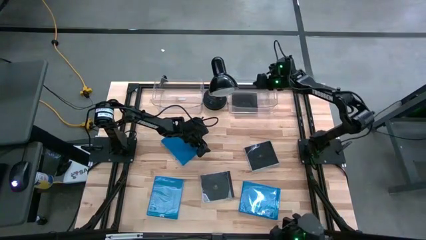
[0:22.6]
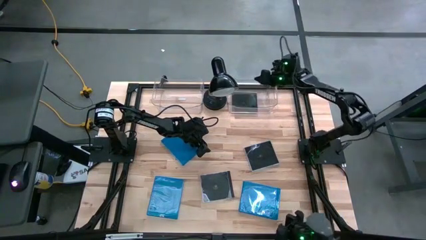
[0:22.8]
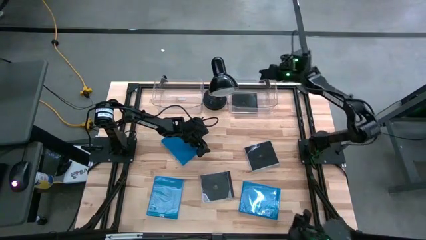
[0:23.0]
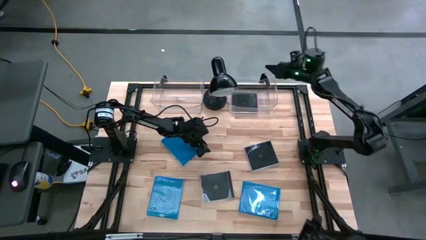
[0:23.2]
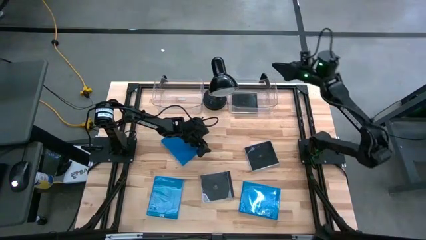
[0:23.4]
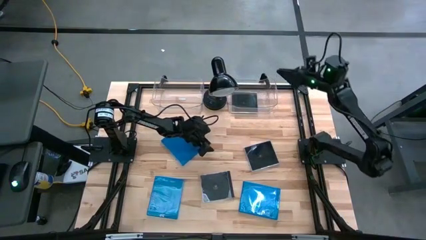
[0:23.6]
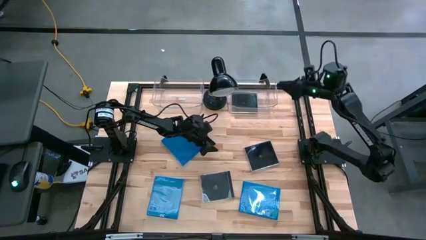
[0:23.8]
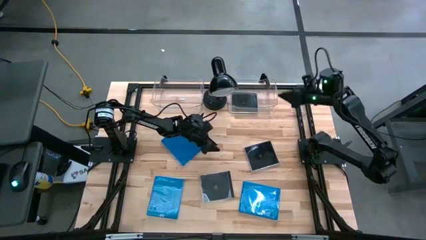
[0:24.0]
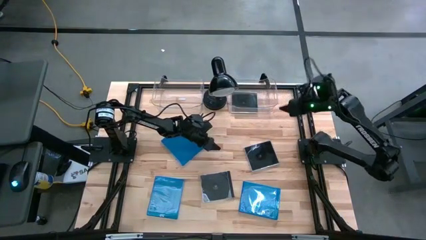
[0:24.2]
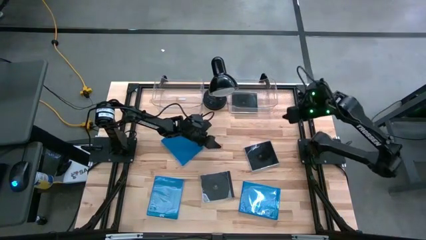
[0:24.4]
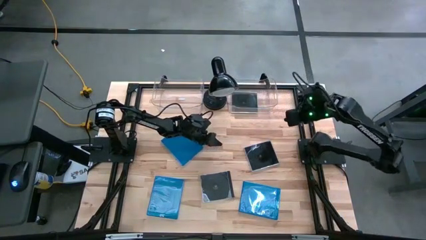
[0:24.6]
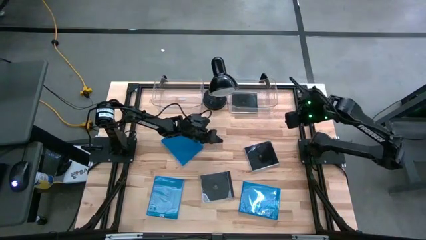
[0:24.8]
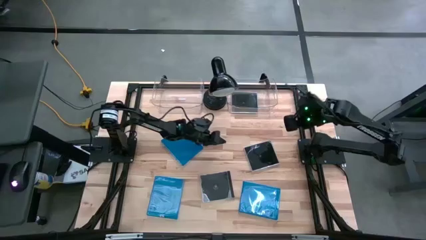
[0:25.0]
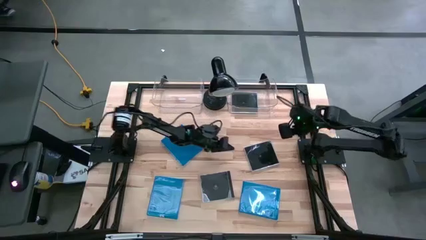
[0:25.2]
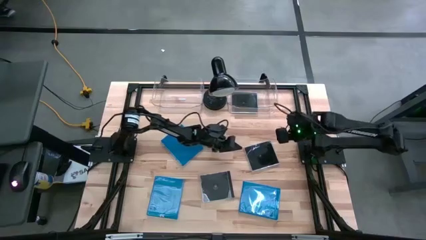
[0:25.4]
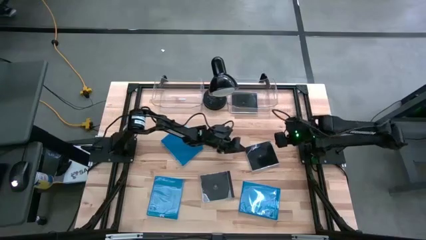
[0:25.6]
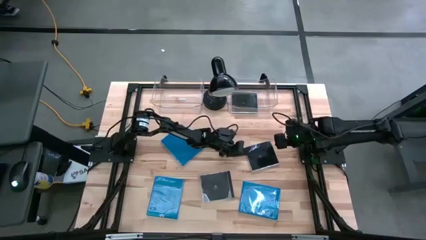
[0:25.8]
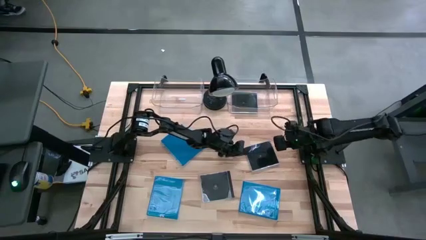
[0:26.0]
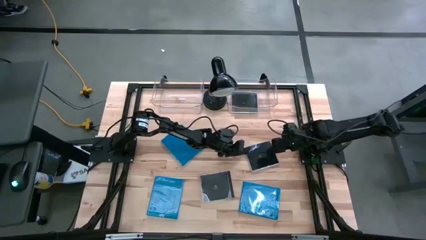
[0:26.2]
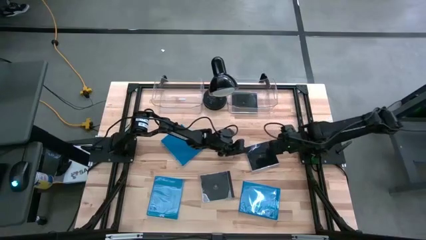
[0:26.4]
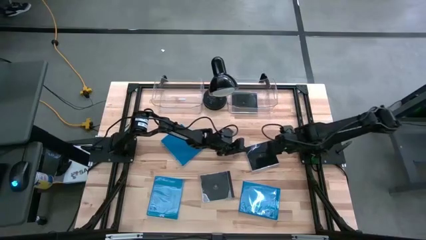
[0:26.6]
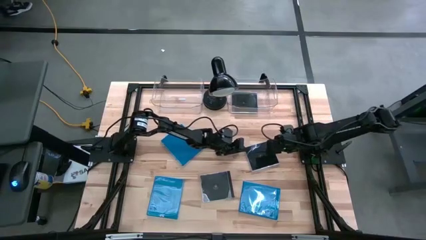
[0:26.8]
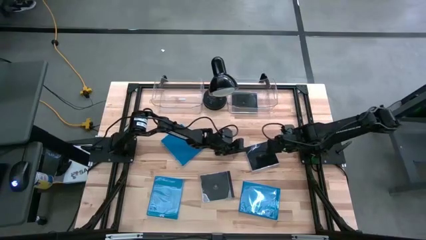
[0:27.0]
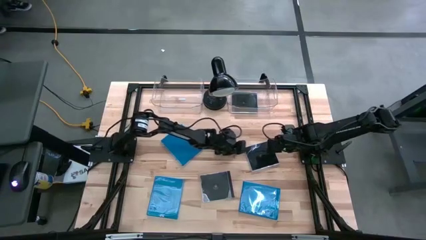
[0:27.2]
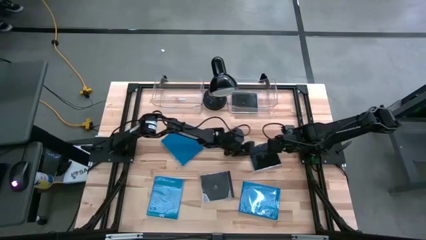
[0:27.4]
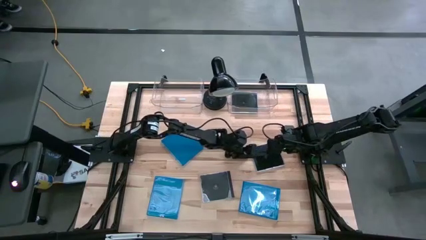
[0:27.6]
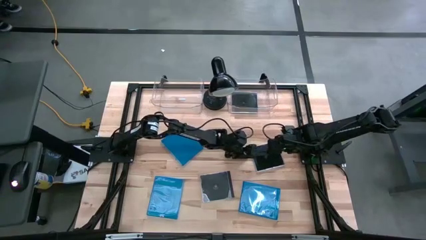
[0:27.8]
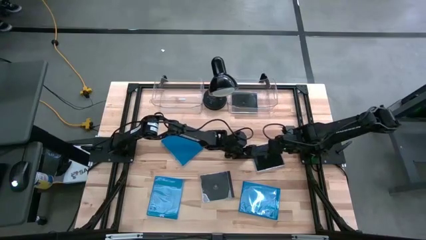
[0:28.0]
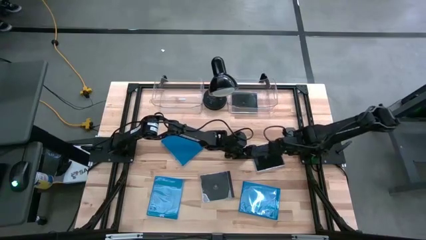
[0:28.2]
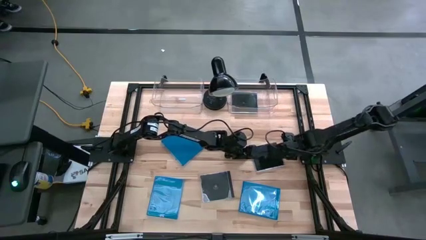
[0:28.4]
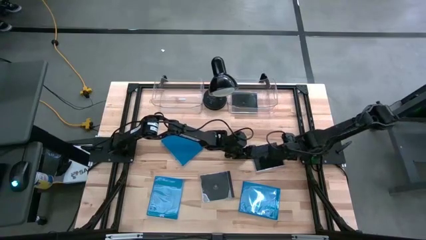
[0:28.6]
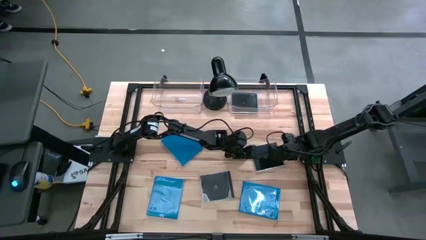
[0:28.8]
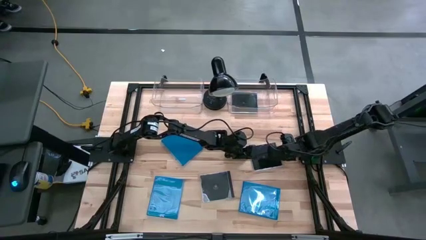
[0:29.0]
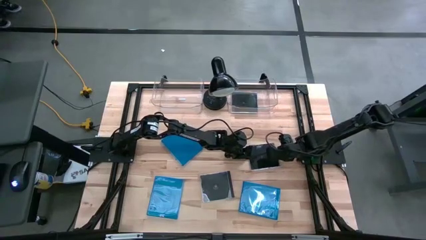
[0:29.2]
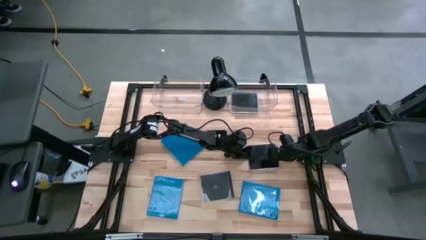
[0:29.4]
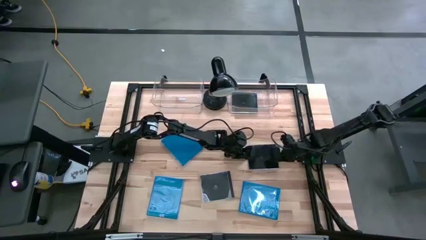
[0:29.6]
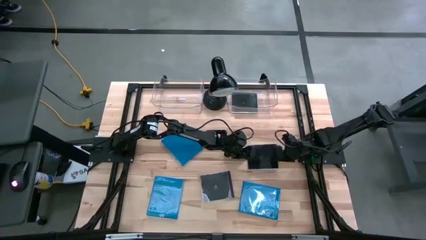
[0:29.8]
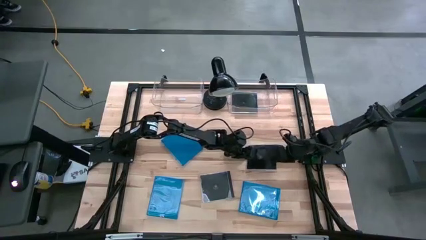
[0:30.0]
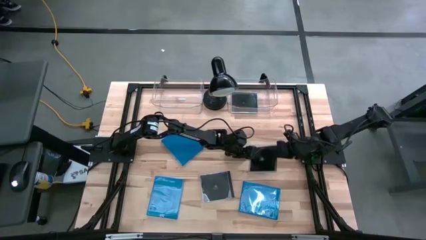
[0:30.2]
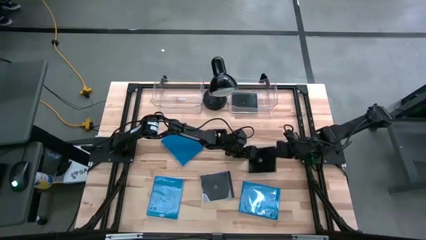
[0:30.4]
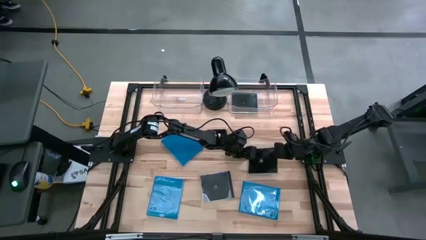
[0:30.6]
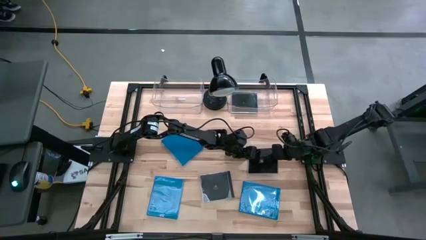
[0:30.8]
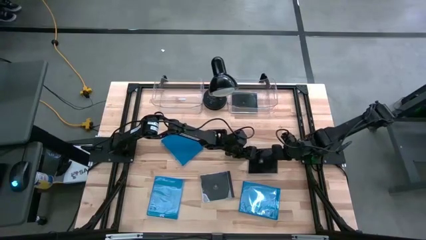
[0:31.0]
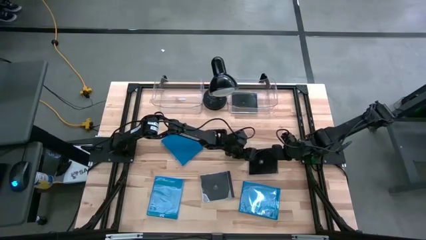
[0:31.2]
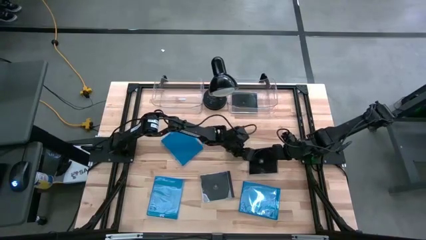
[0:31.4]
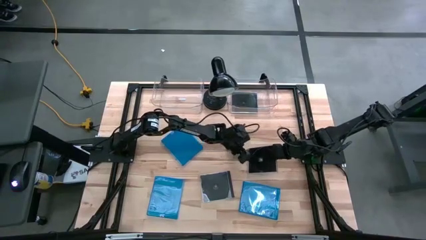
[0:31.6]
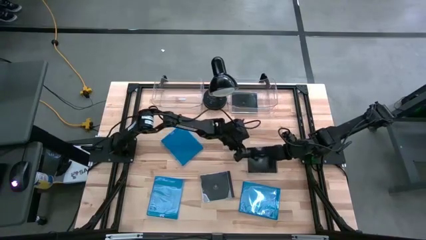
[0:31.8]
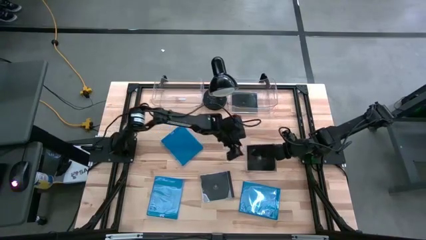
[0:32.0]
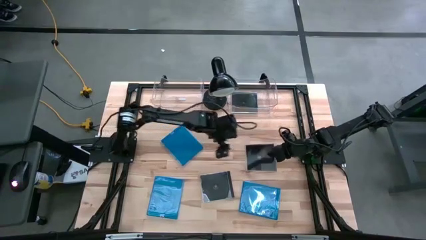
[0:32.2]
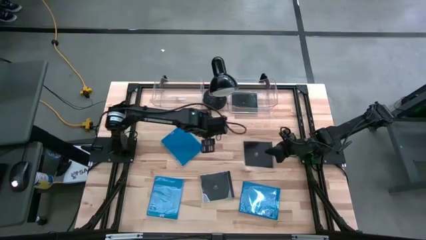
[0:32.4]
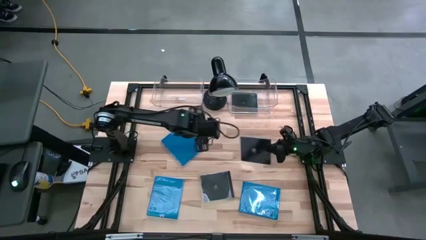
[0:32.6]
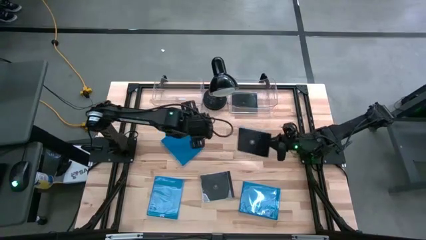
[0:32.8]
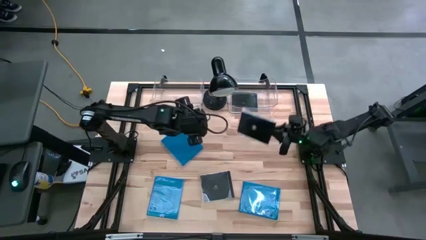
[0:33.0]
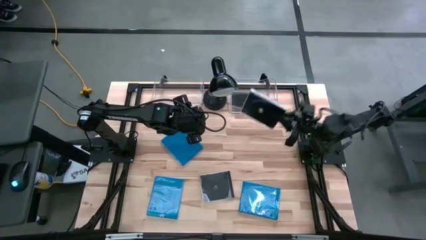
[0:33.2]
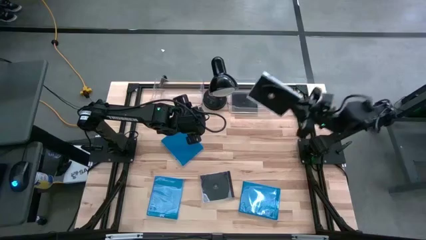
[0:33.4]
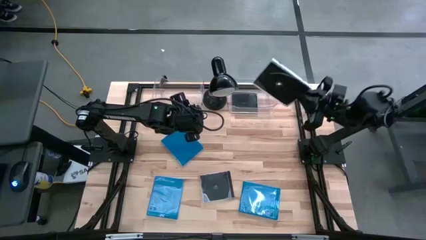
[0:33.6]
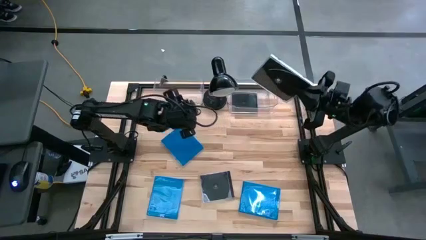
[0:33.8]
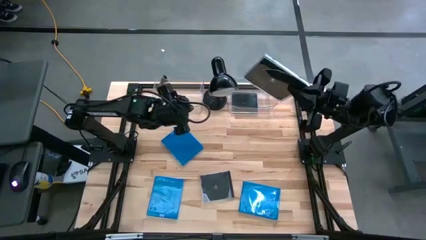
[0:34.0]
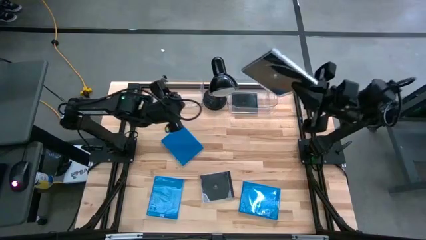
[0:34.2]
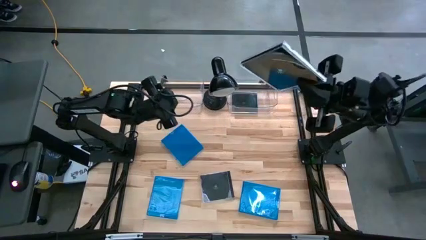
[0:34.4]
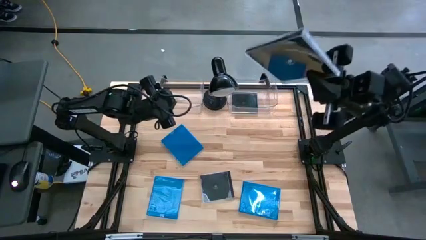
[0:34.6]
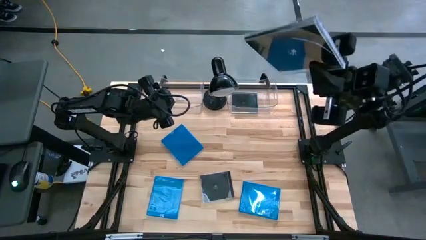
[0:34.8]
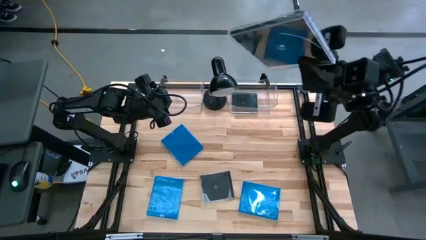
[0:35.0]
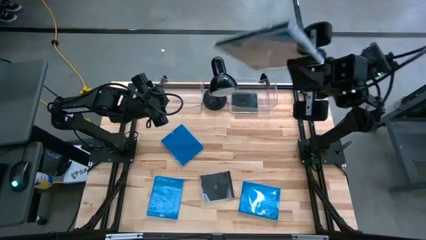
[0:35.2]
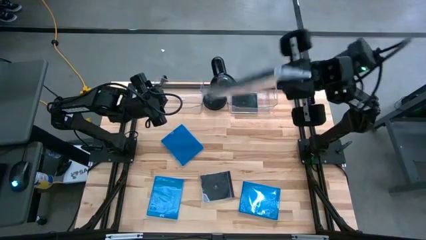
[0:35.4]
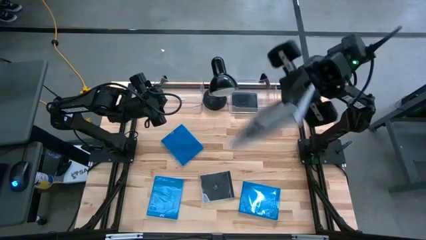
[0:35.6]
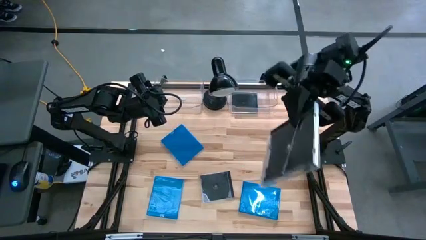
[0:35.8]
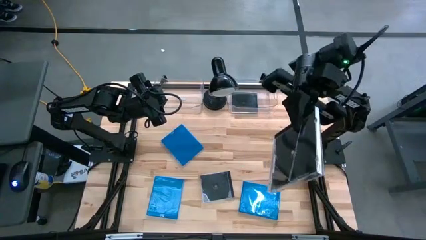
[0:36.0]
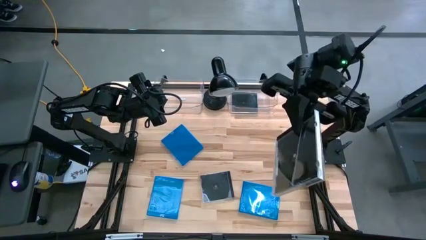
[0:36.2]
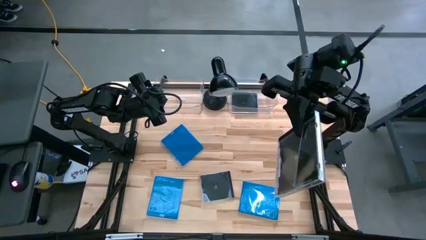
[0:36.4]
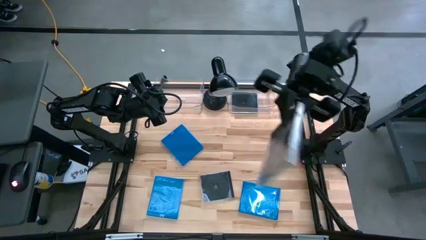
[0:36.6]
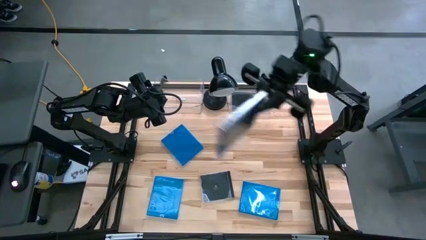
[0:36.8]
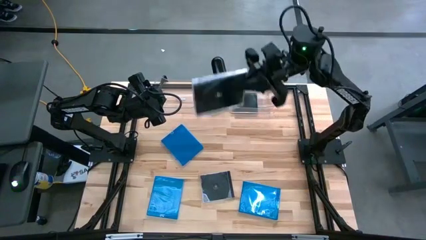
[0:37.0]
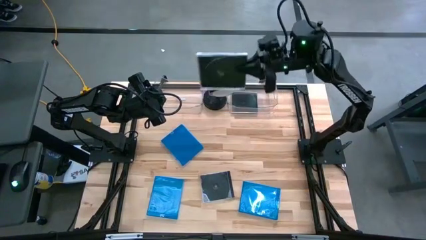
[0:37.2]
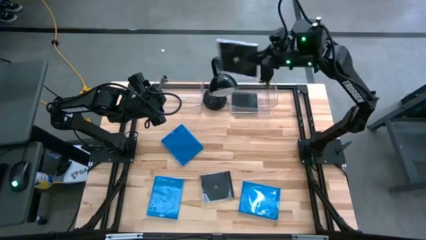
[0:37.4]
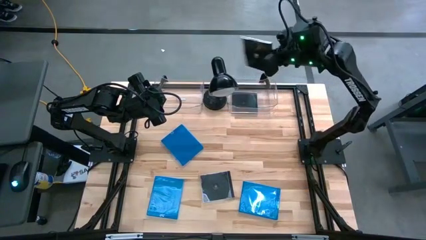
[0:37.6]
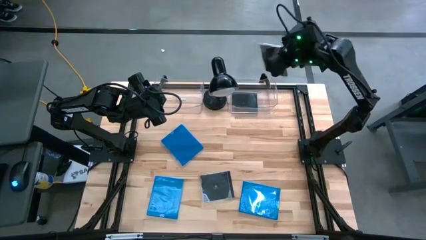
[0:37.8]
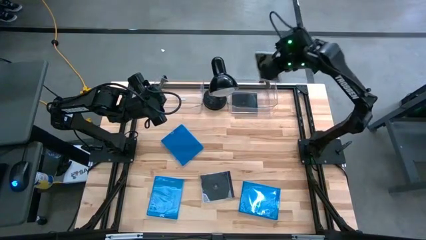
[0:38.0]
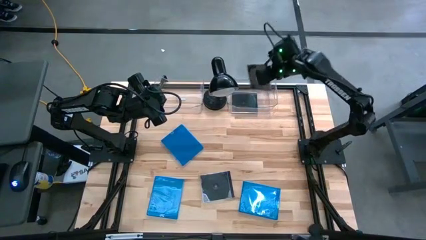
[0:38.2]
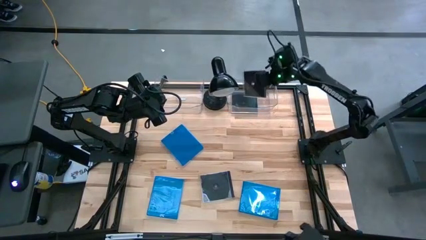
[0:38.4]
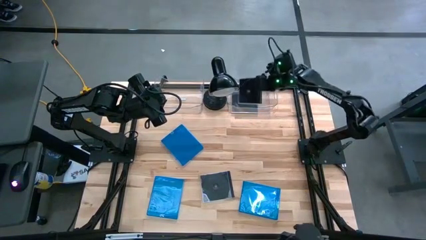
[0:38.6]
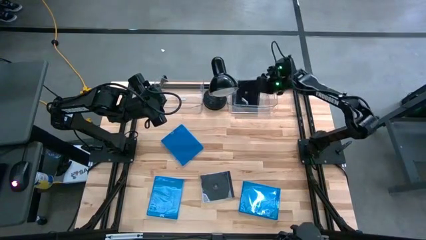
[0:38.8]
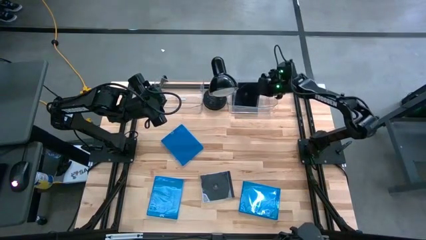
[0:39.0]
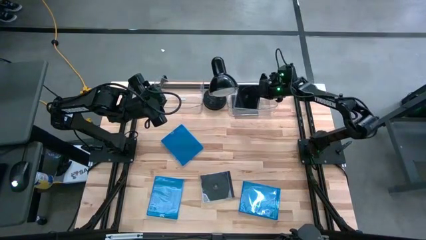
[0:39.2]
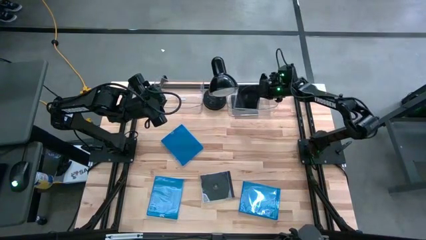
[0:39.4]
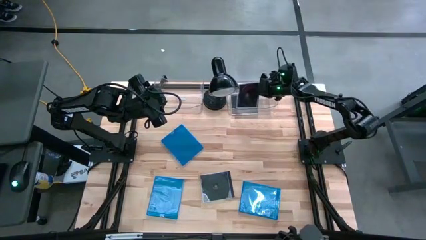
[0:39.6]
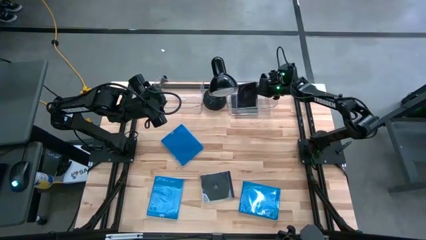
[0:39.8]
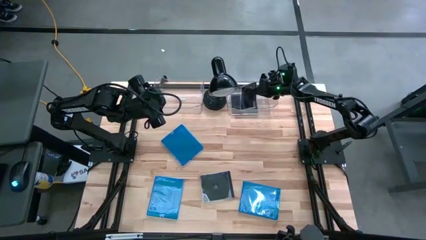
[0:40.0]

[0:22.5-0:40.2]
Task: Pick & place jewel cases by type
Put the right black CD case into the right transparent bin
